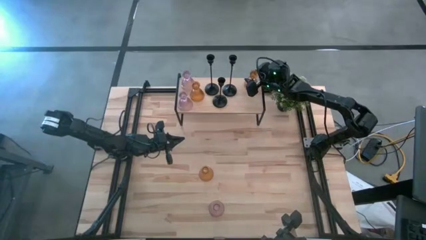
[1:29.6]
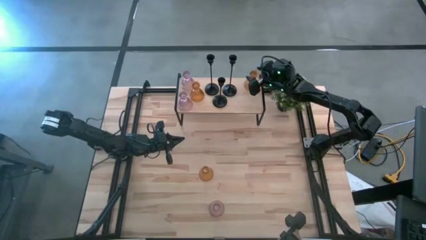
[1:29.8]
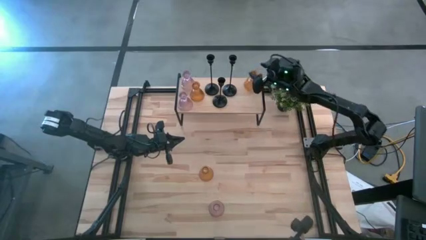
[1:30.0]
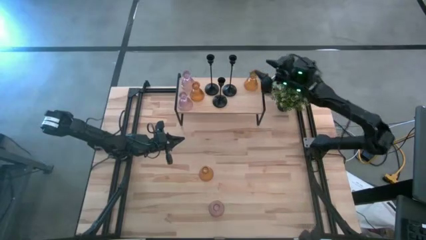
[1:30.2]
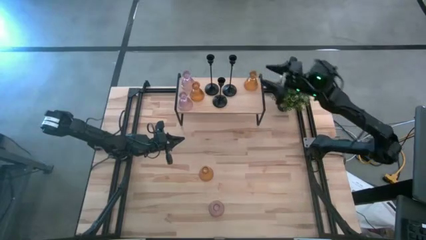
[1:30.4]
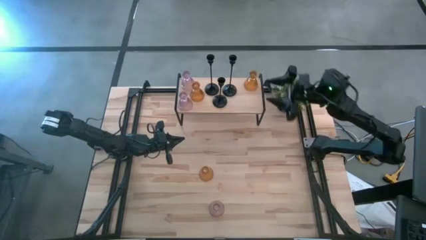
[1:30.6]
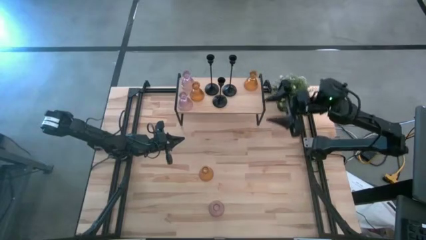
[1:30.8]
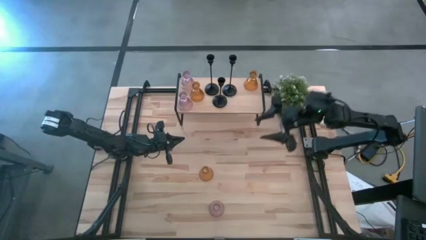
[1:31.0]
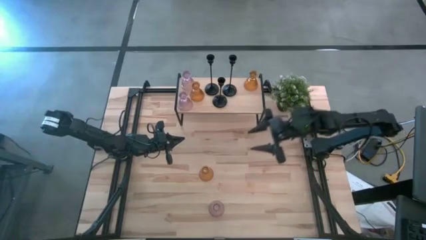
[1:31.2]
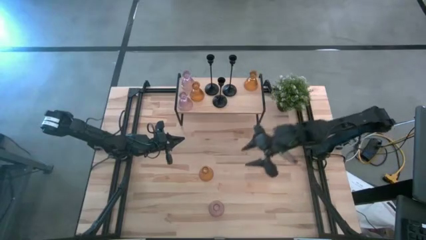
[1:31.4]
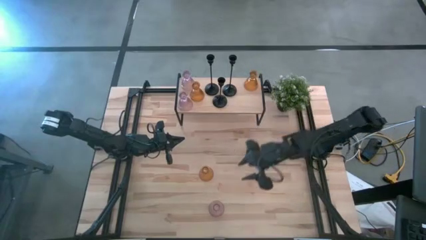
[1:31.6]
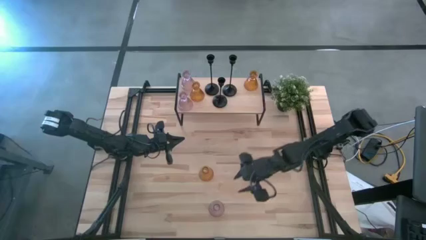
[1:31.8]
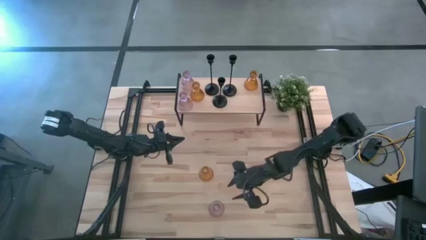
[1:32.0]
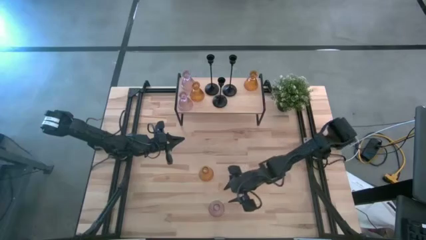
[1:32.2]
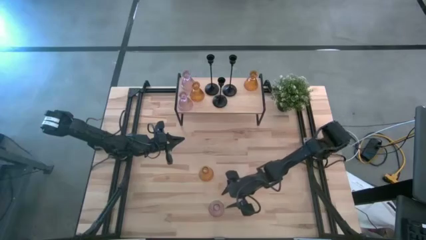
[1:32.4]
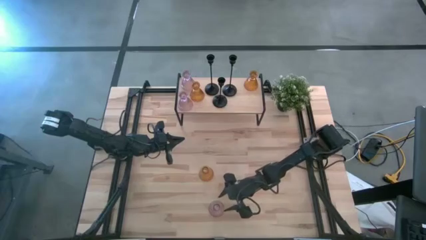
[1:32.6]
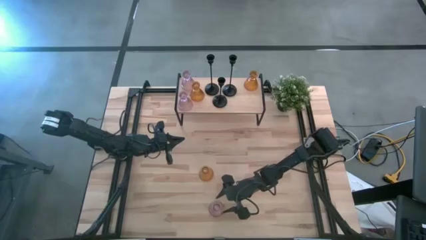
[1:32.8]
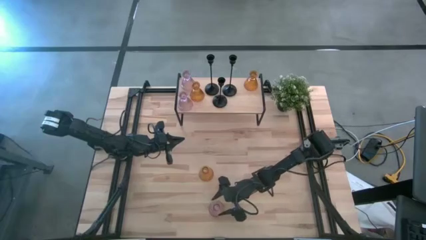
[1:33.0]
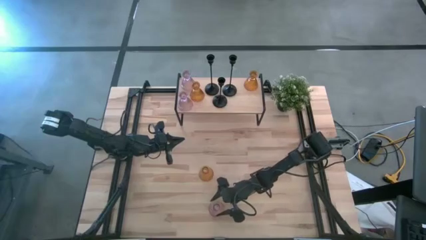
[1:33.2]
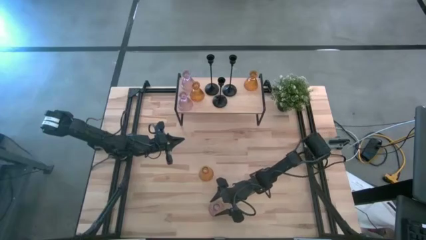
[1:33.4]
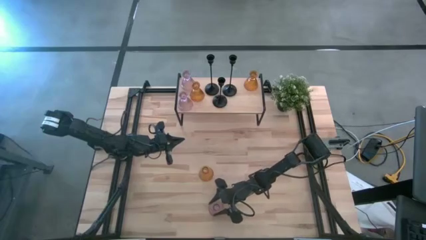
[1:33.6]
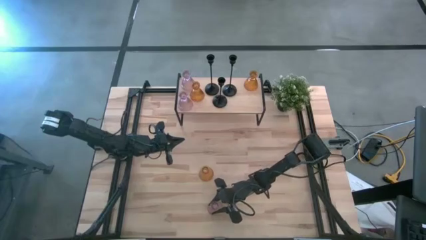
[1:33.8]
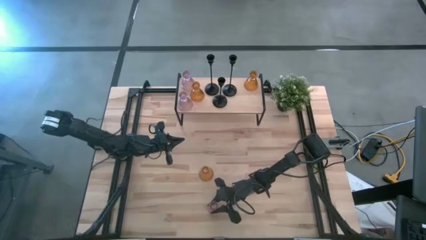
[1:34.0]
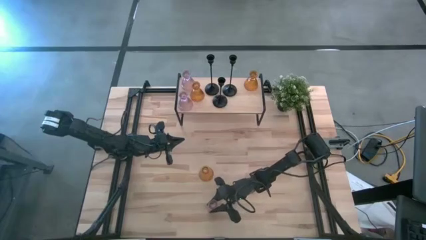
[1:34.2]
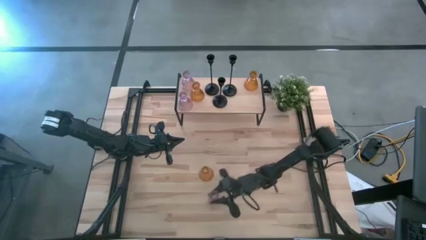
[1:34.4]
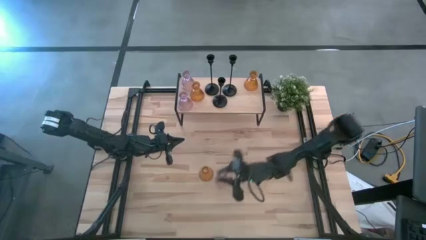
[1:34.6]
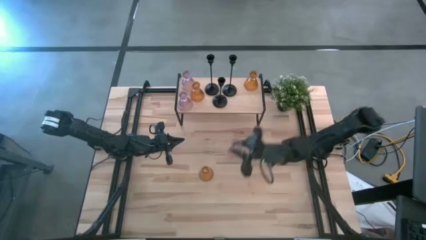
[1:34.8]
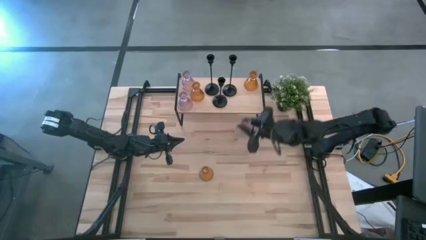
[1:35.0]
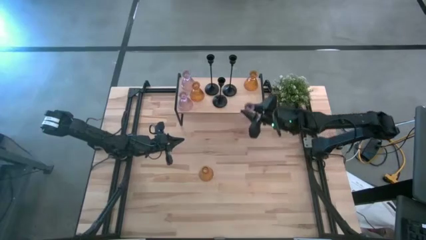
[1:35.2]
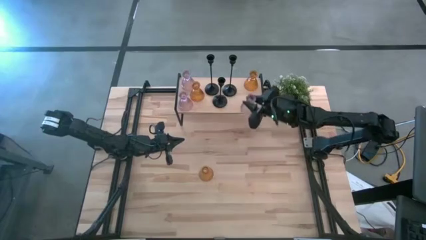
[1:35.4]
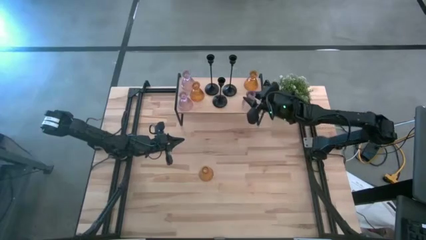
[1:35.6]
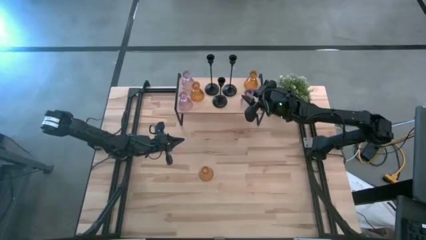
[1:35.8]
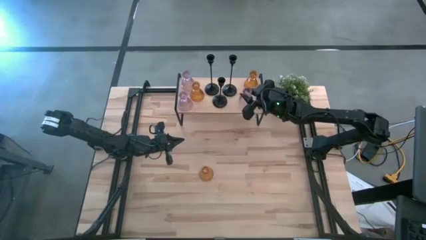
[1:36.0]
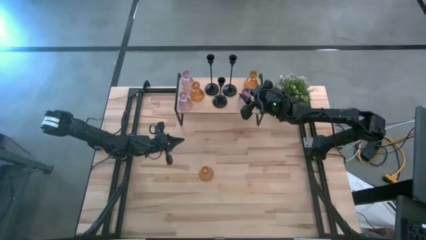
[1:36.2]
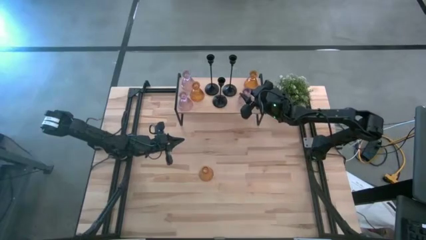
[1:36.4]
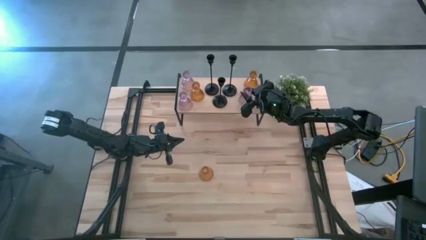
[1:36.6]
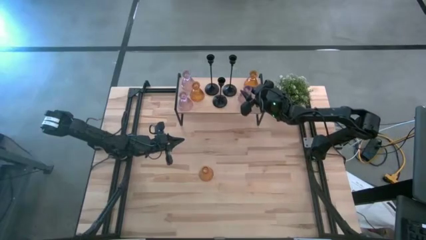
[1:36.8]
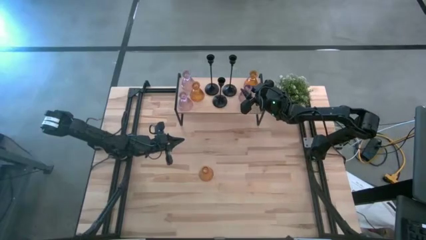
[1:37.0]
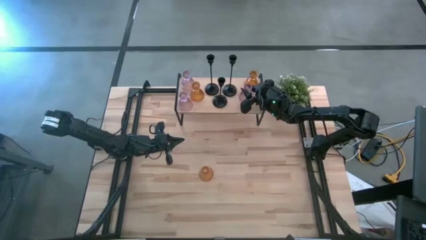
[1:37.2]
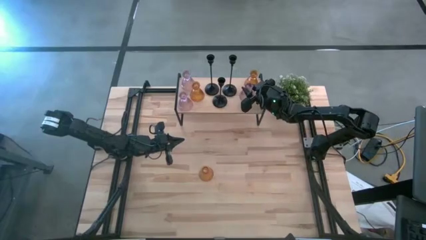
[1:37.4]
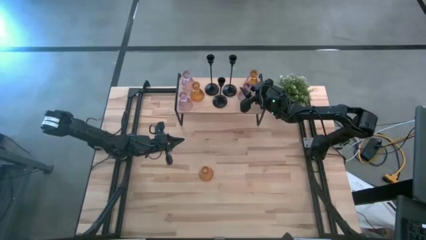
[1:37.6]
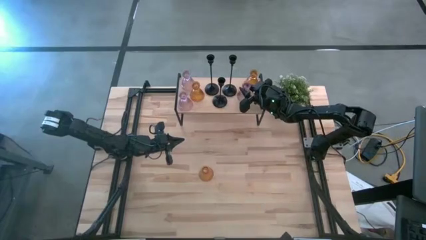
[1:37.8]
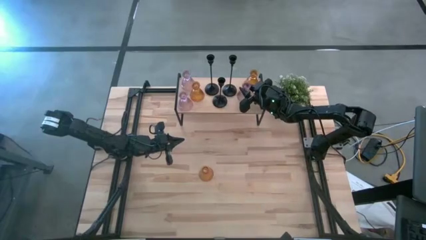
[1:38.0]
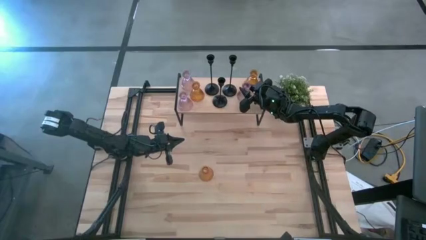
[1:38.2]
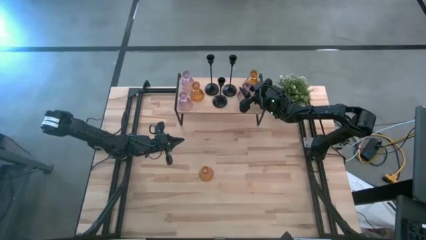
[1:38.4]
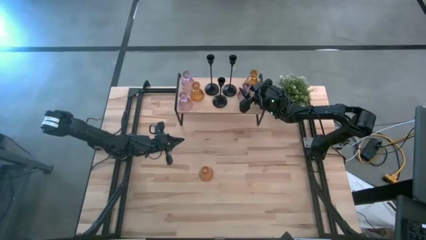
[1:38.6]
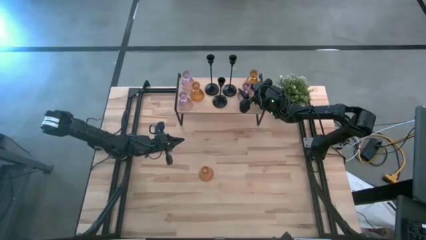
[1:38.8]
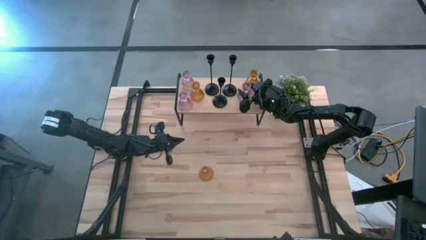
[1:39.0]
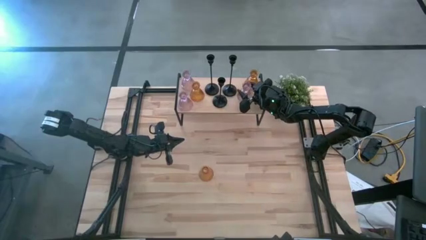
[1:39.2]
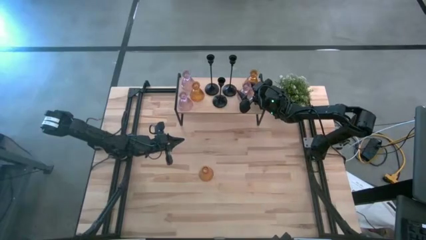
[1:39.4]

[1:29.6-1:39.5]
Task: Pick & Place candle stick holders
Put the pink glass candle holder on the shelf

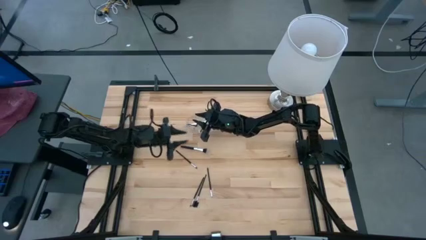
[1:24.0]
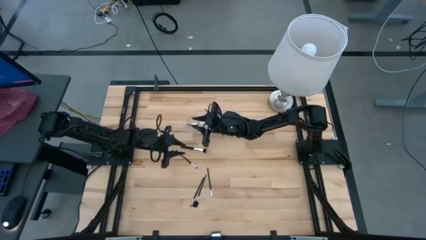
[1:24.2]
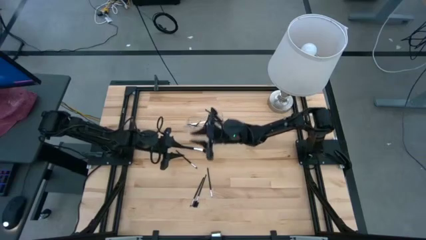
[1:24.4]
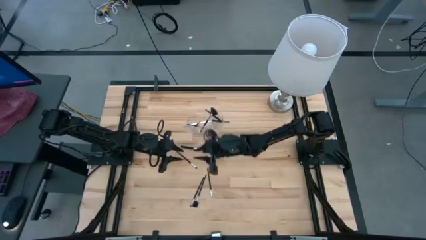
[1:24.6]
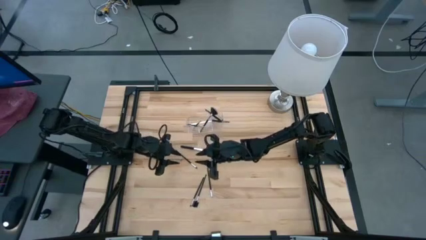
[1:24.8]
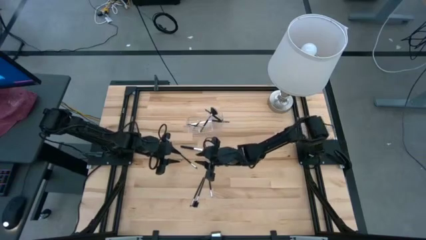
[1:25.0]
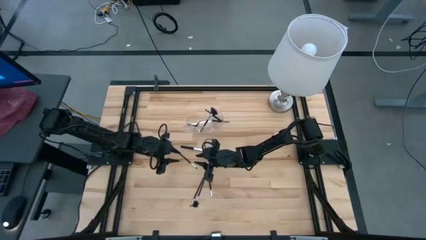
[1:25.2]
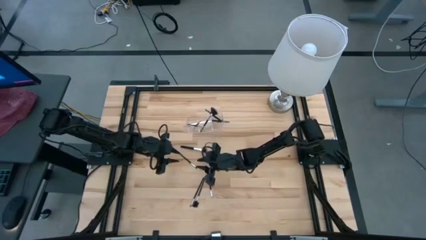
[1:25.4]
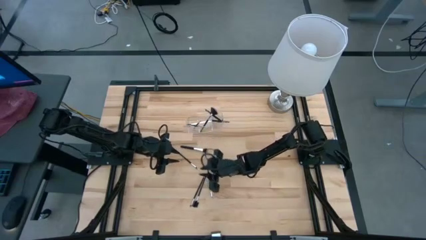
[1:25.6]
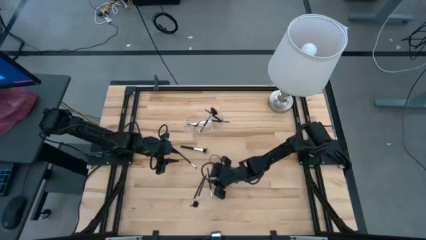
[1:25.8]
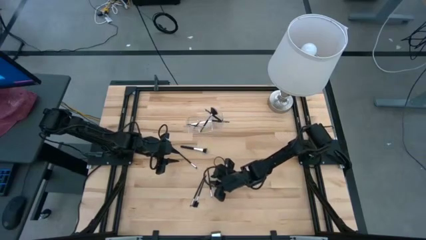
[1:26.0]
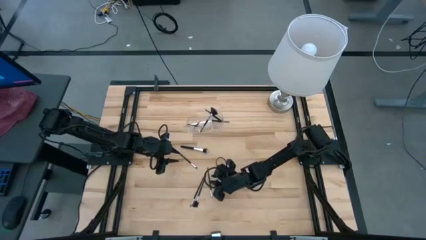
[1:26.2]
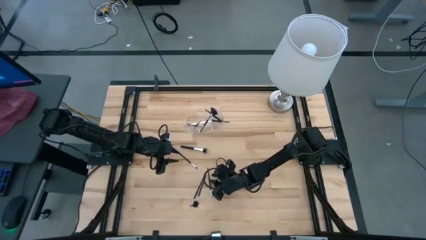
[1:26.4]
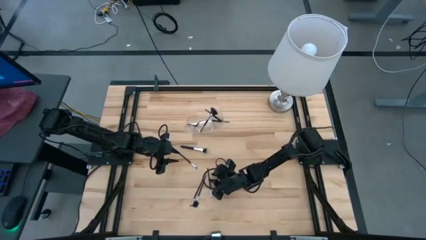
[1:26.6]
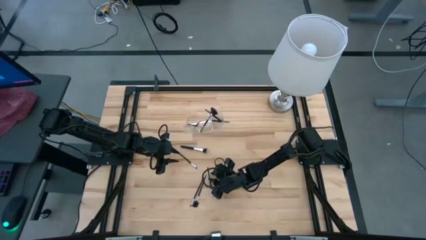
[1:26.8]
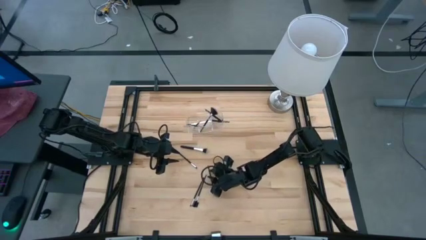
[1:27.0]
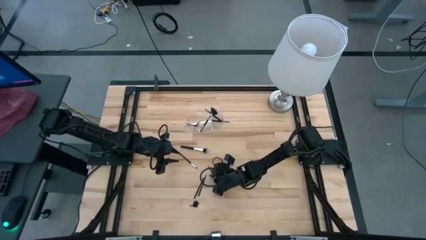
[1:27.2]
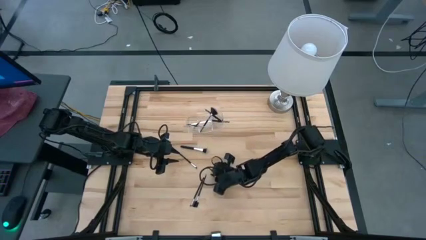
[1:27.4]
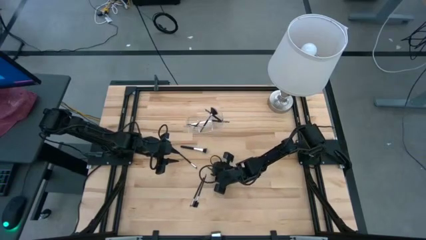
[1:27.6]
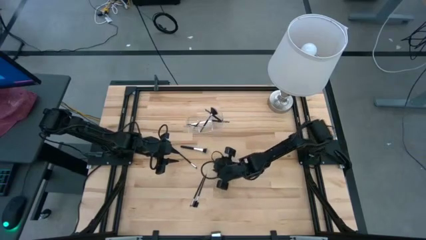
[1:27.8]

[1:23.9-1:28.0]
Task: Put items in baskets/containers
Put the black liner brush into the transparent organizer
